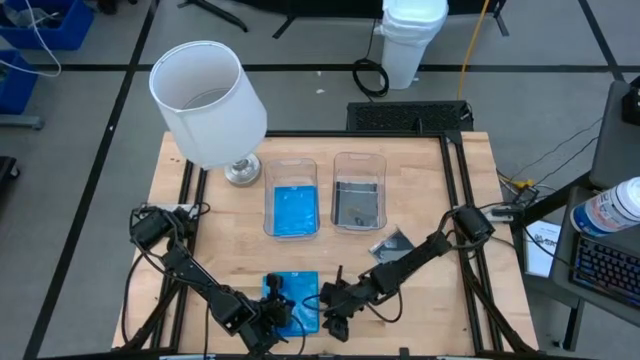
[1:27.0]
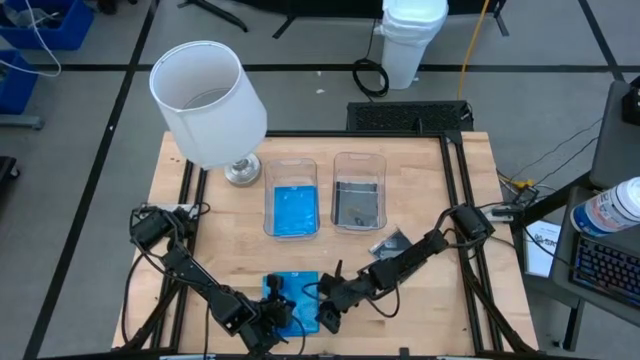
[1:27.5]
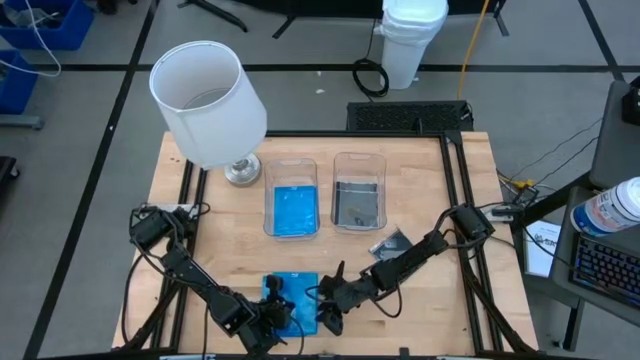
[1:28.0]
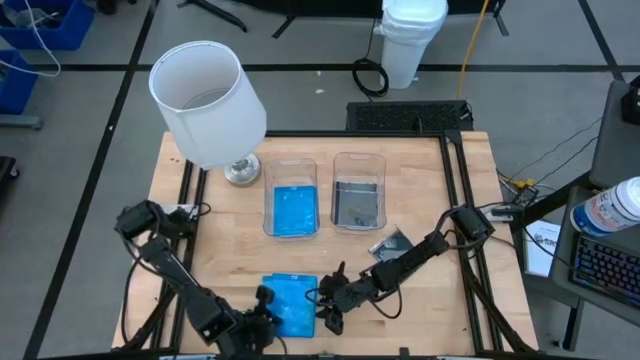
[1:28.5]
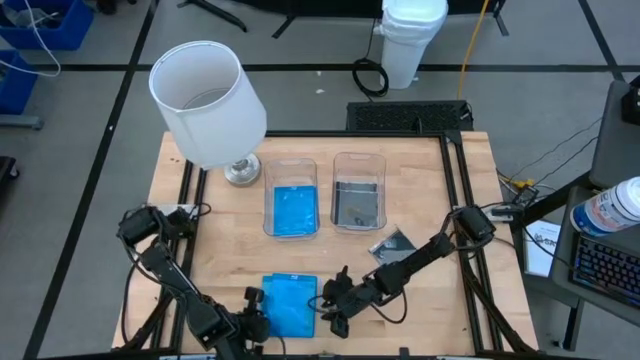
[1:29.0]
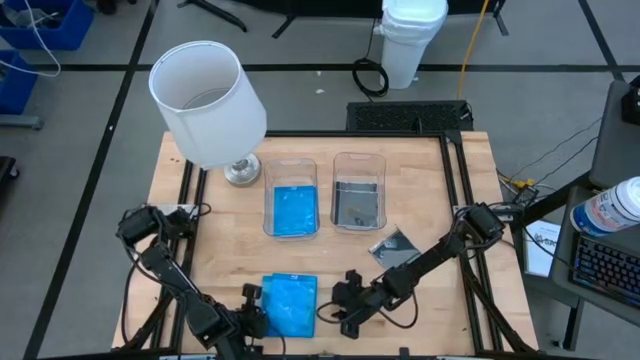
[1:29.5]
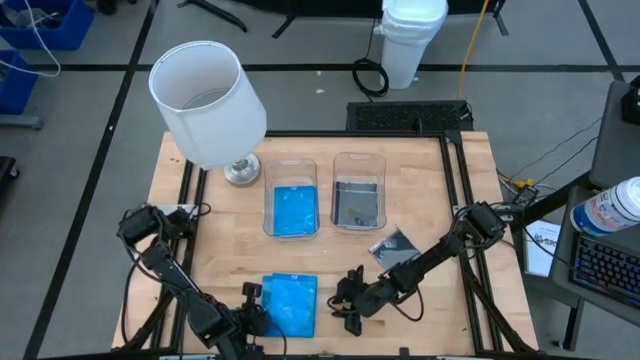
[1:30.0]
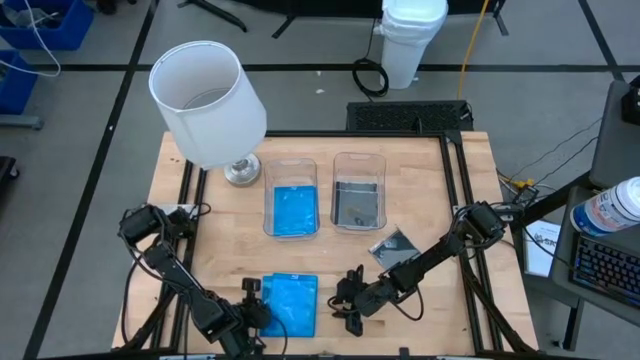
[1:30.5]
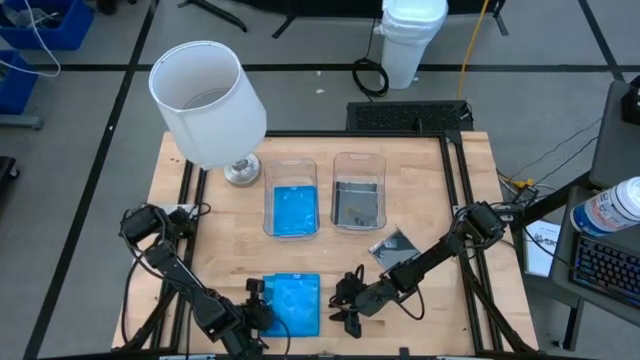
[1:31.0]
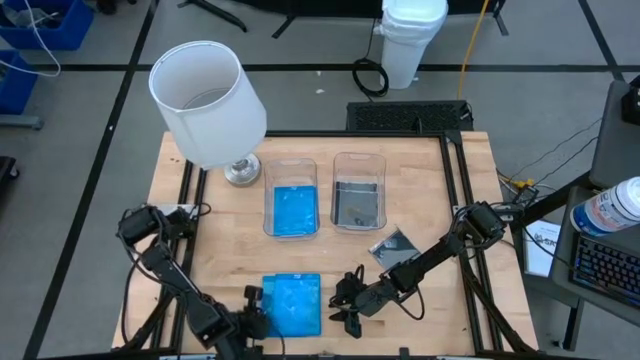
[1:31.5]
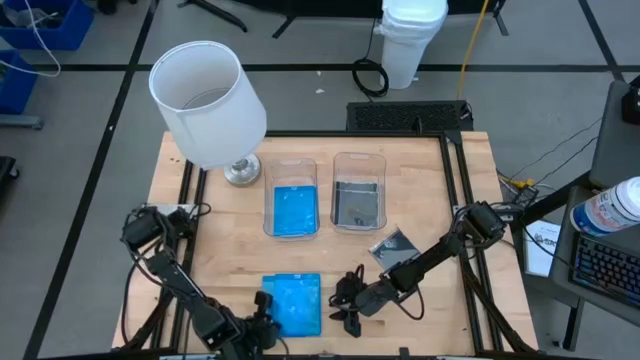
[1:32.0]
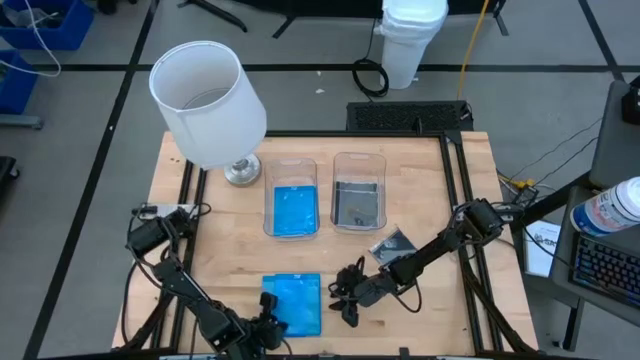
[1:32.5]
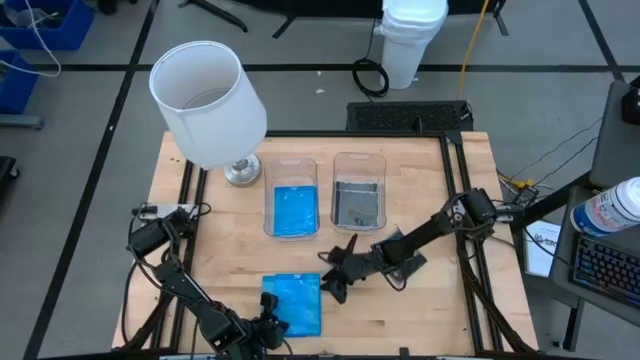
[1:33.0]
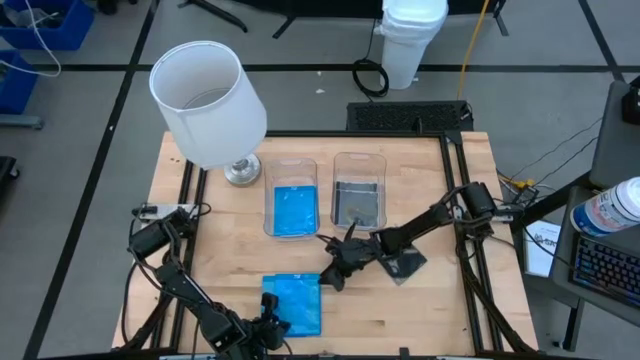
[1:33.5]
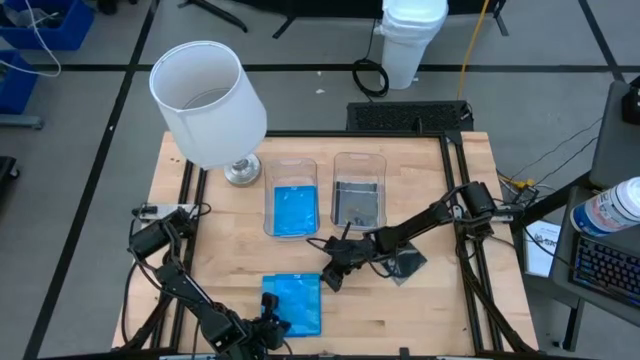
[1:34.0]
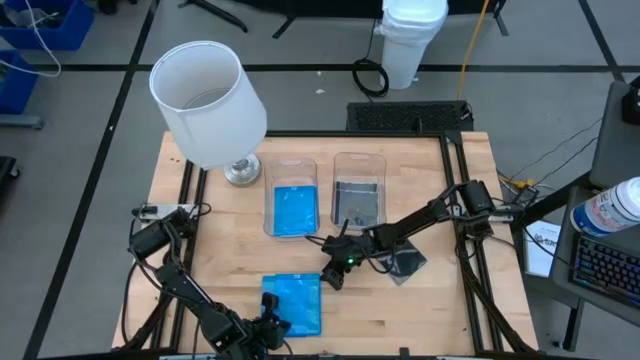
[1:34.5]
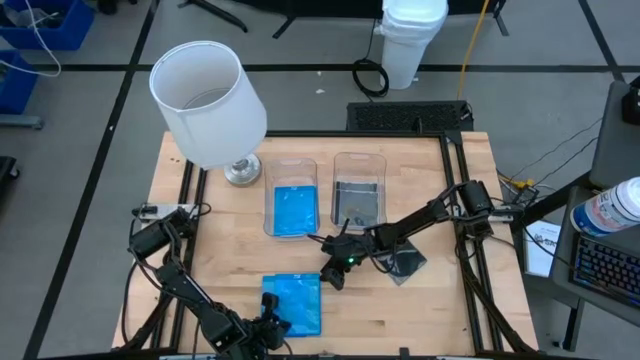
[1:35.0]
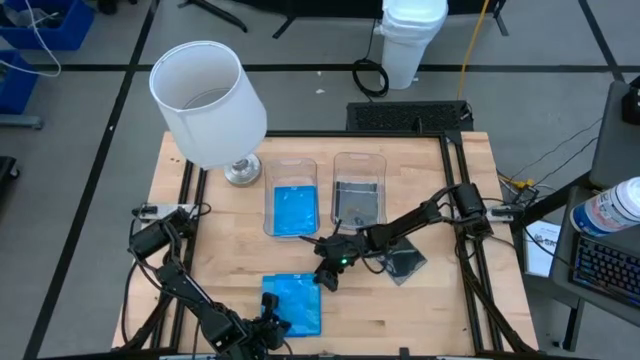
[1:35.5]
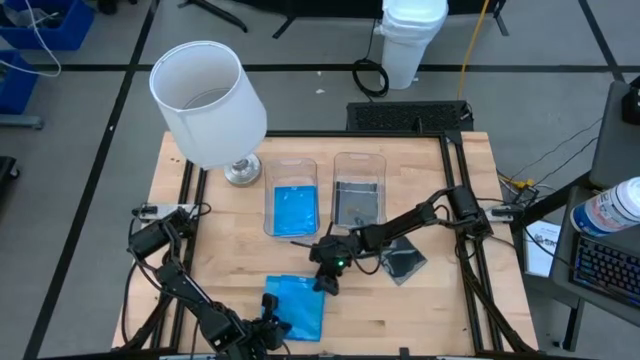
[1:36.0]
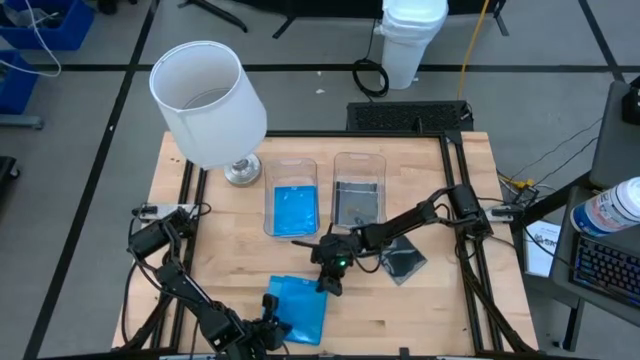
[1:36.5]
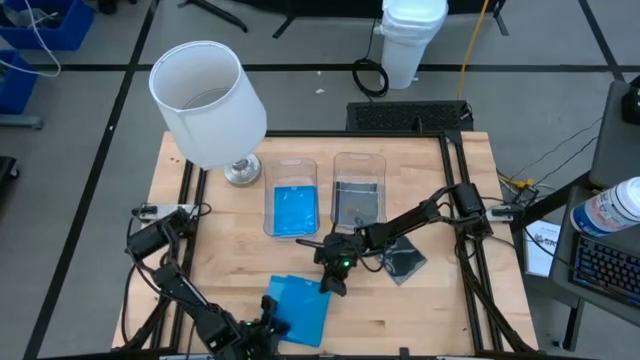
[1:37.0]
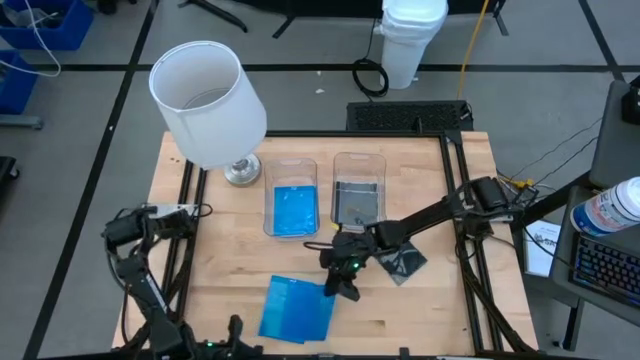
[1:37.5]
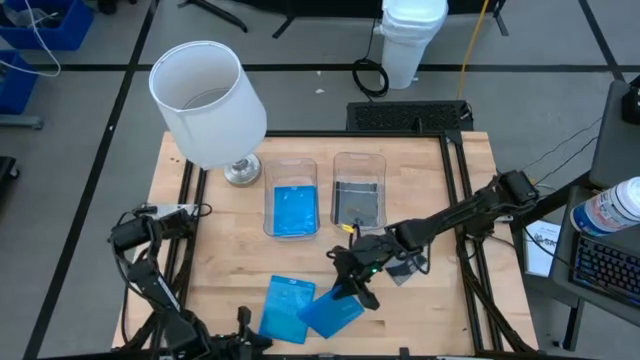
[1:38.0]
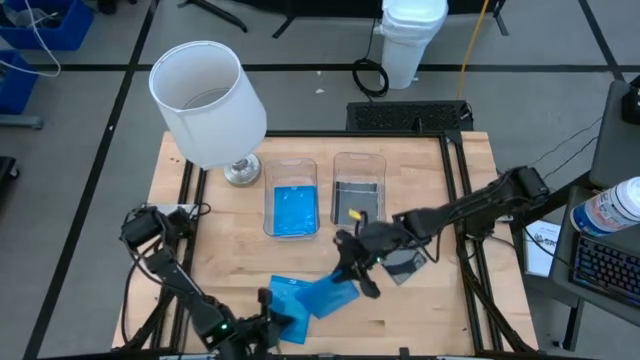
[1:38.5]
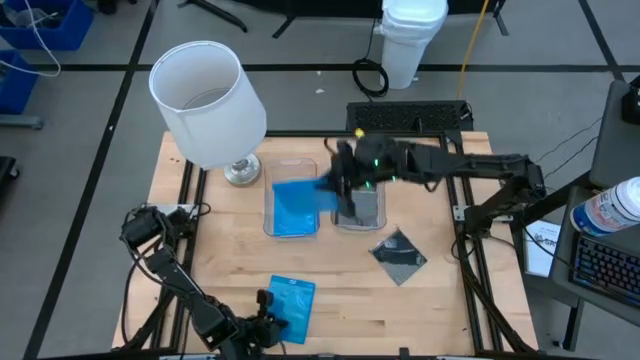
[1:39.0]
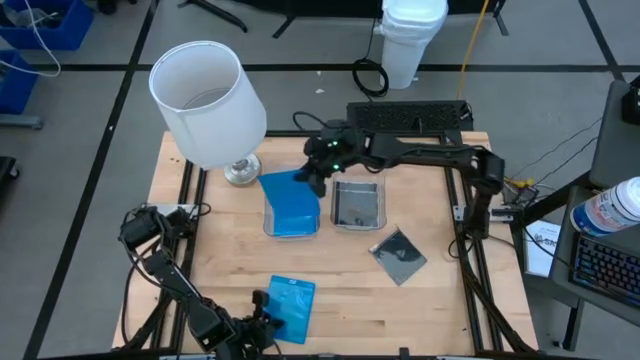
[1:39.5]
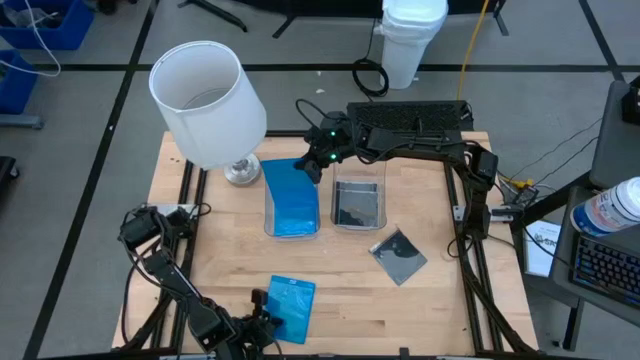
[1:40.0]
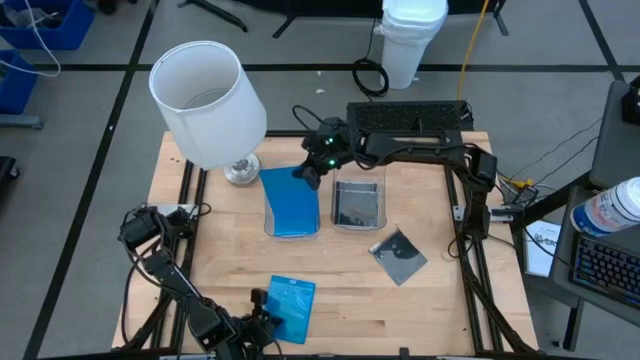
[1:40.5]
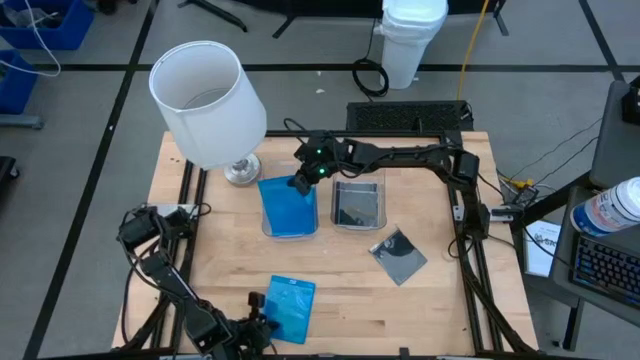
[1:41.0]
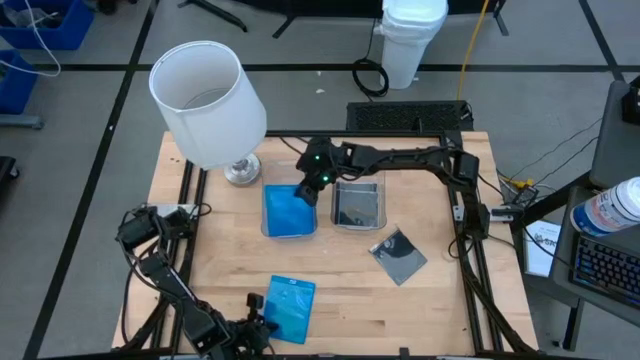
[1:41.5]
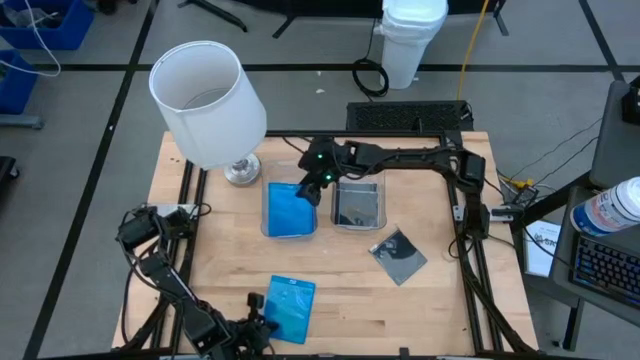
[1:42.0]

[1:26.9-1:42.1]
Task: Pick & place jewel cases by type
Put the blue CD case into the left transparent bin

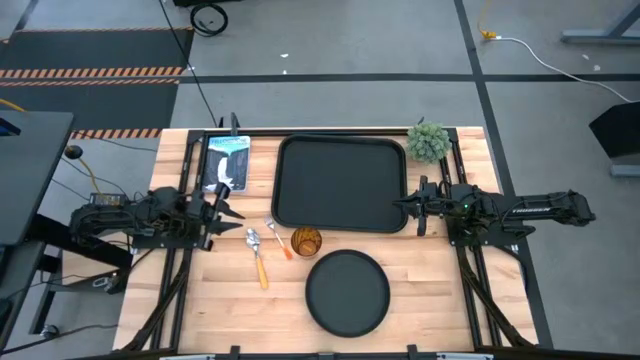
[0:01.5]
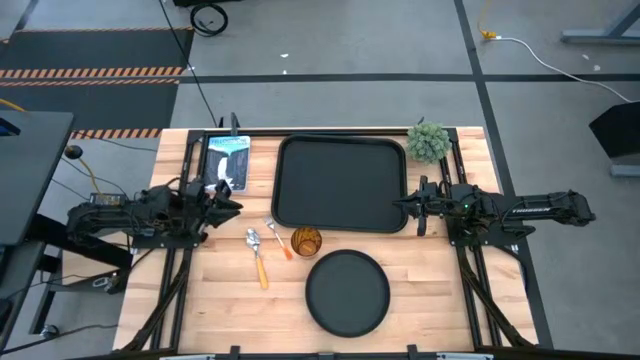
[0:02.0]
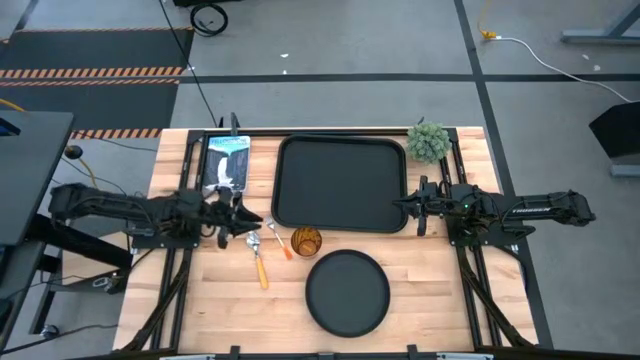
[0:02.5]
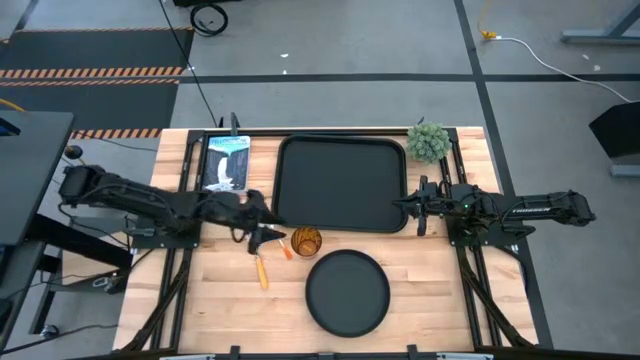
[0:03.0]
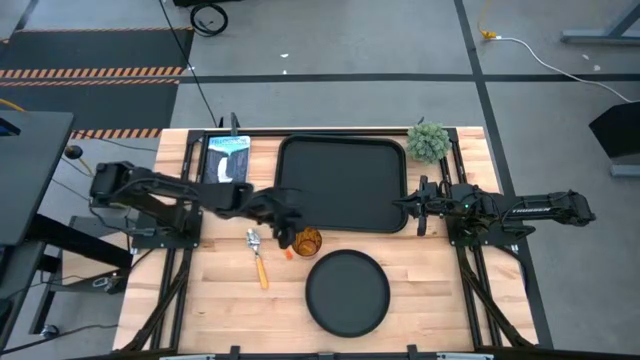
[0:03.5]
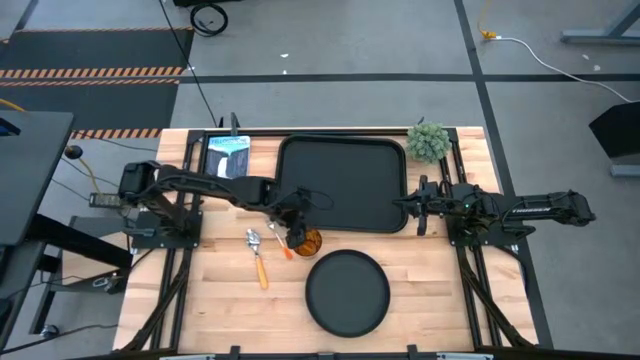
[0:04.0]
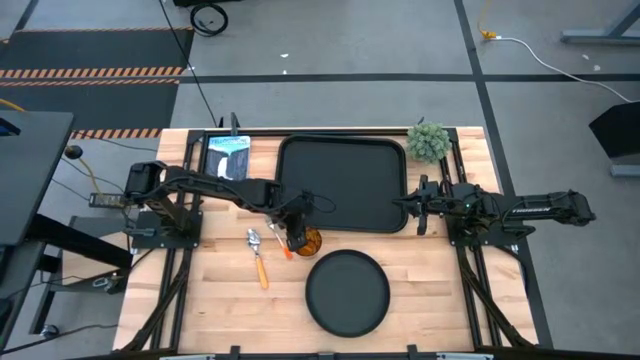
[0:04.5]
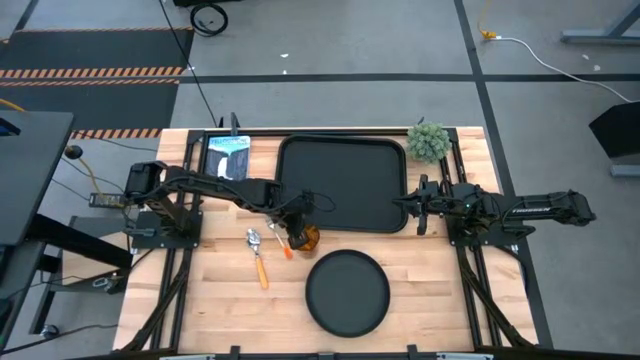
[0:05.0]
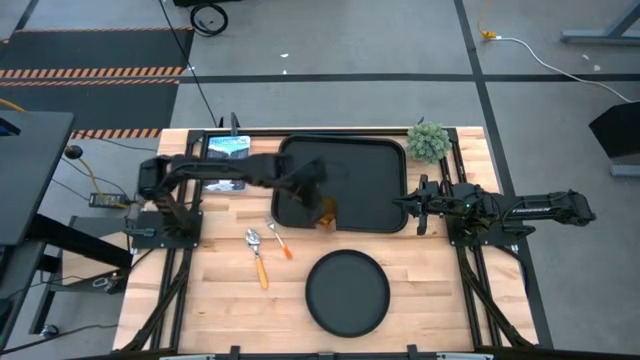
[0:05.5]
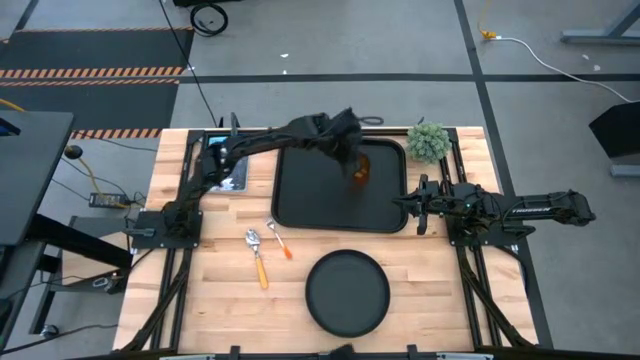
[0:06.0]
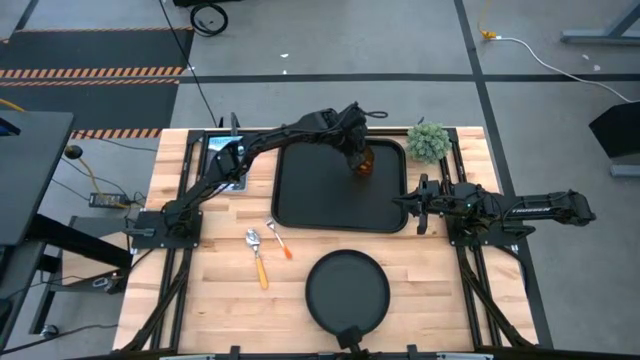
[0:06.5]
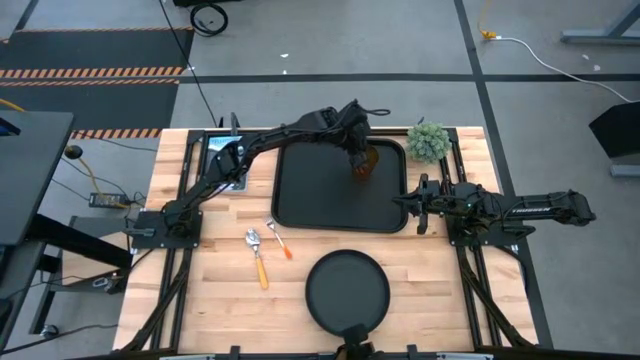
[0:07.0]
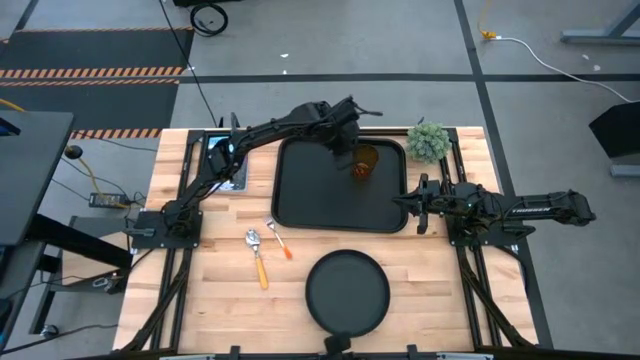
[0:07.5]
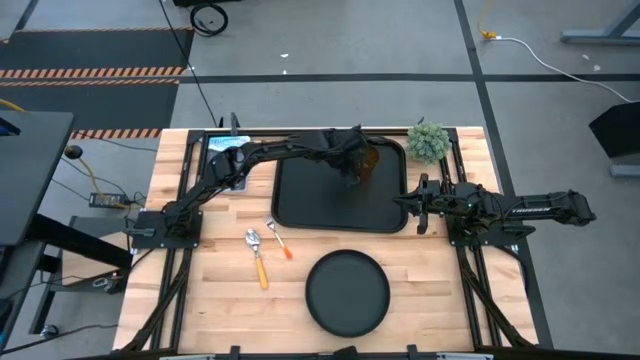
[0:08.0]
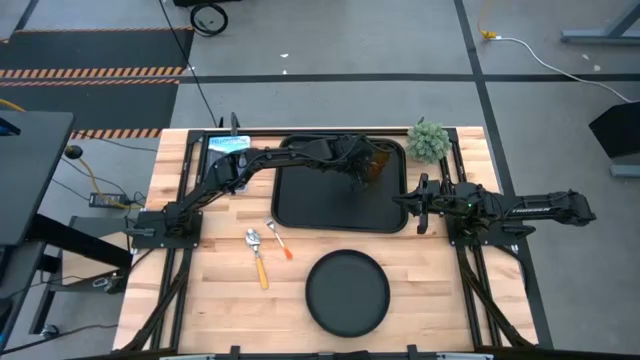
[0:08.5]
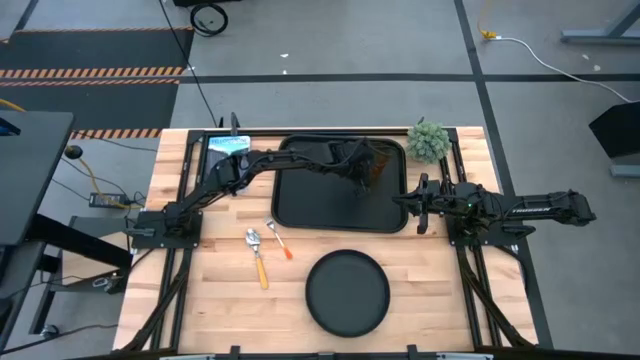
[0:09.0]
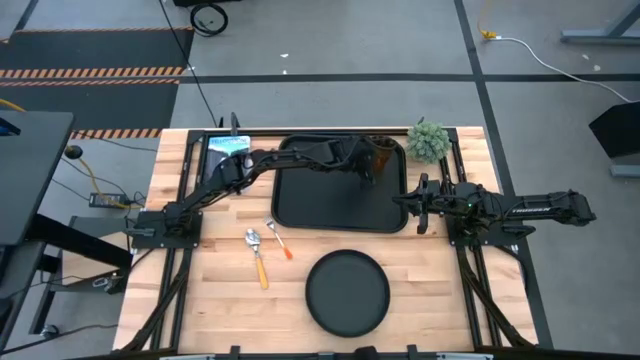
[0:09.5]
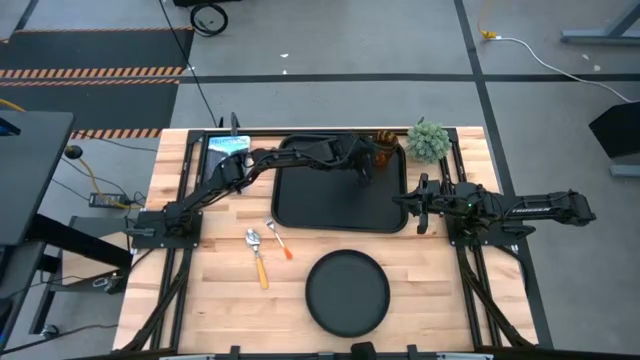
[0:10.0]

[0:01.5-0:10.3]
Task: Pick and place plate/cup/fork/spoon on tray
Put the brown glass on the black serving tray
